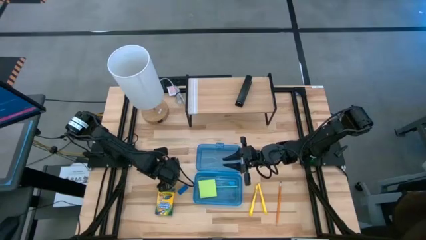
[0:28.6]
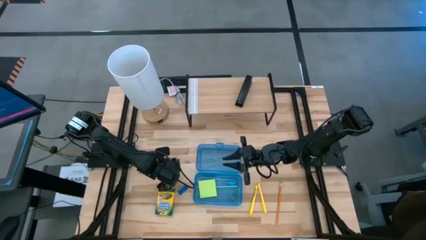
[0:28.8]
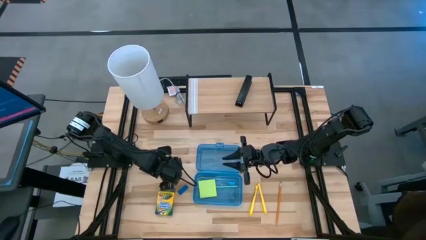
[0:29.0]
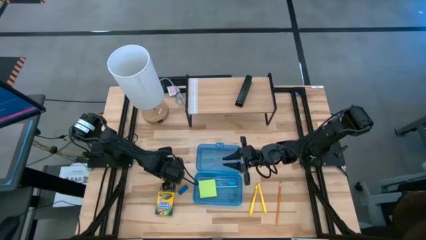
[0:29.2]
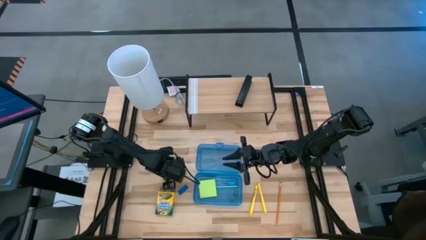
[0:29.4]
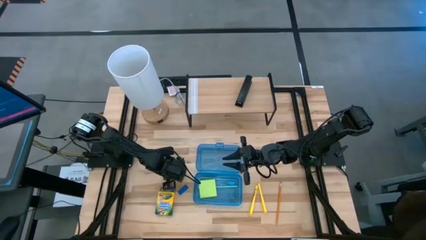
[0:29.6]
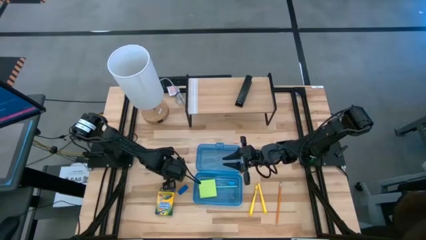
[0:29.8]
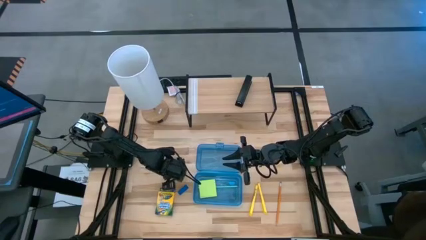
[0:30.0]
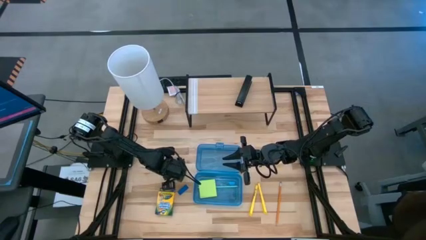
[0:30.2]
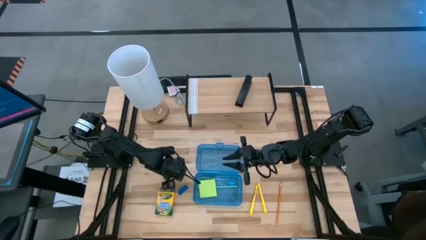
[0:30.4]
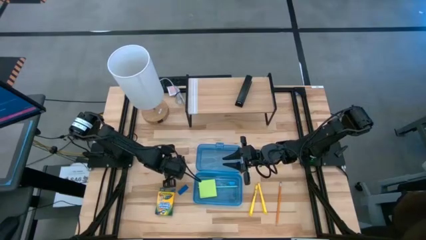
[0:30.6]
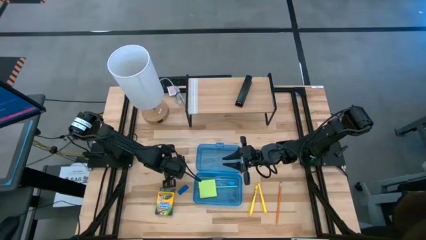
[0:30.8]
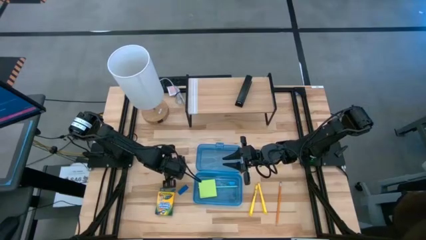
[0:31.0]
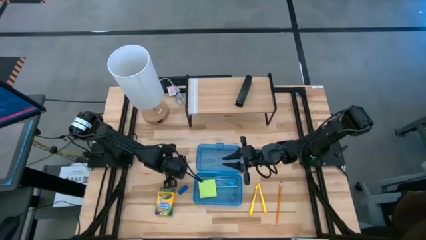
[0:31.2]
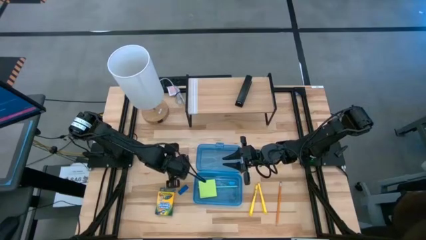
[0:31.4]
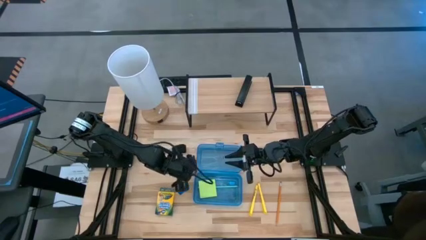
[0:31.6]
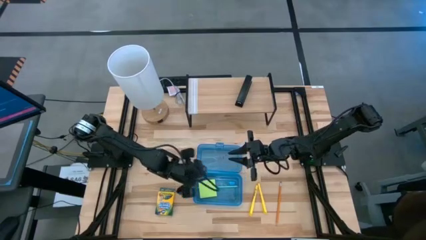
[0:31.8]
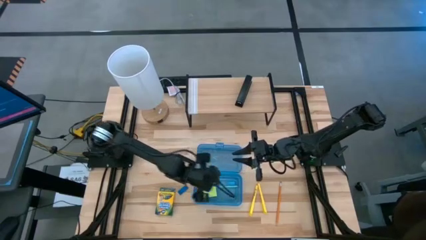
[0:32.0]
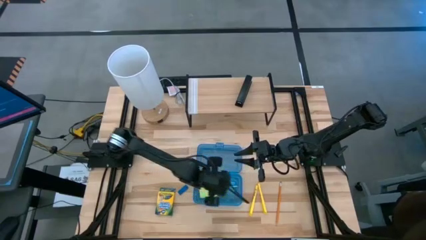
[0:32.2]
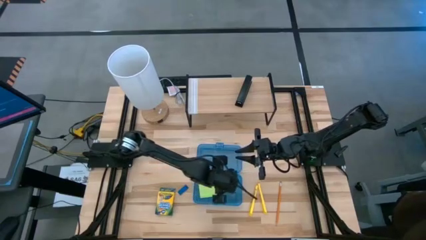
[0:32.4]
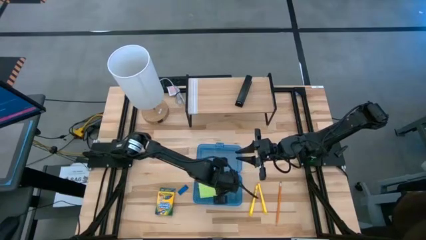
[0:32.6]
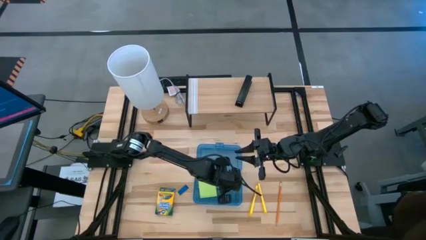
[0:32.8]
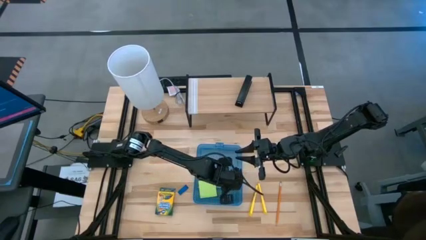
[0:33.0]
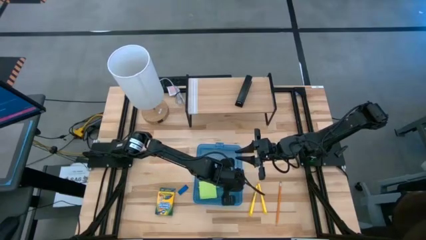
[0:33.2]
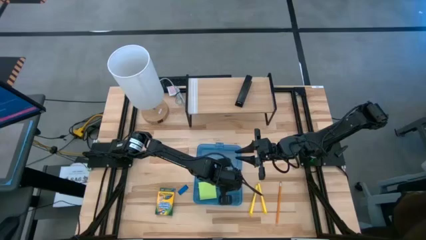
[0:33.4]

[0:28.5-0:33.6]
Task: Pack school essentials
Put the black scissors into the blue supply box

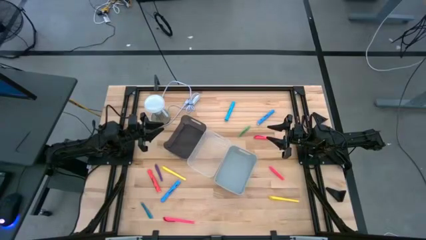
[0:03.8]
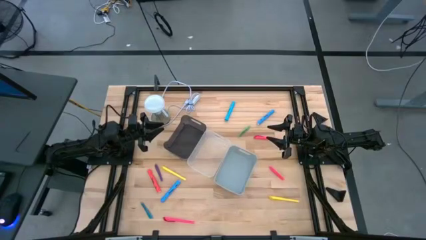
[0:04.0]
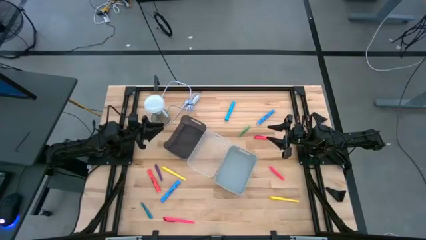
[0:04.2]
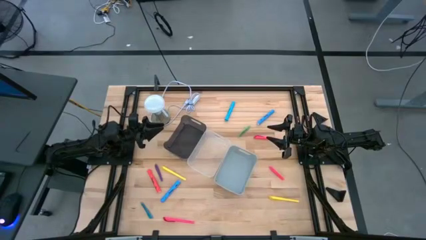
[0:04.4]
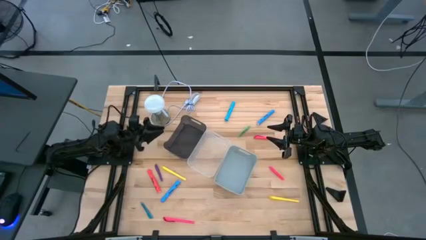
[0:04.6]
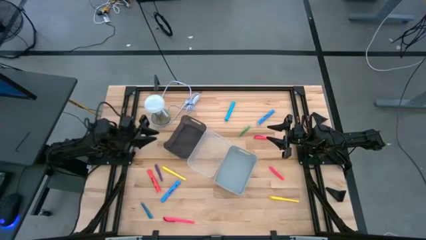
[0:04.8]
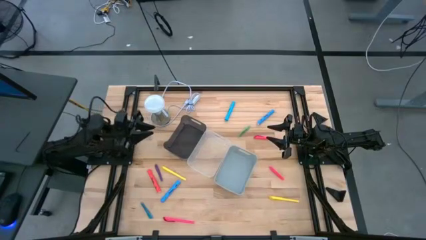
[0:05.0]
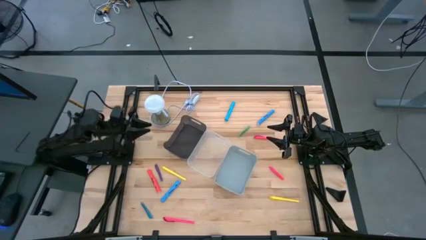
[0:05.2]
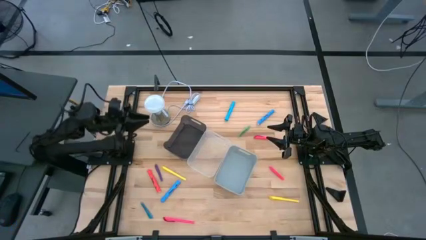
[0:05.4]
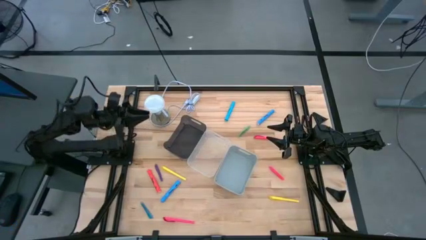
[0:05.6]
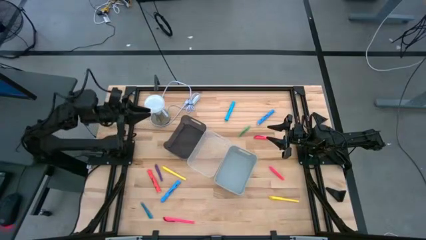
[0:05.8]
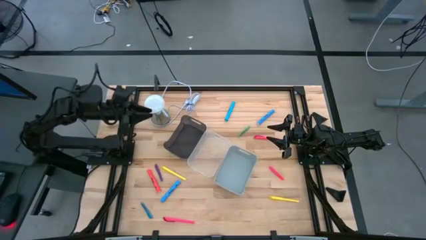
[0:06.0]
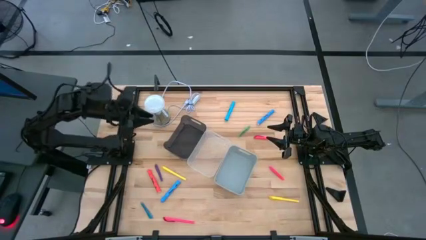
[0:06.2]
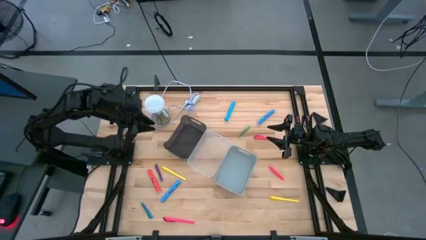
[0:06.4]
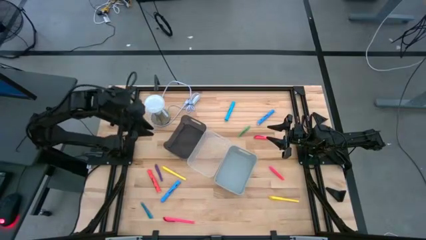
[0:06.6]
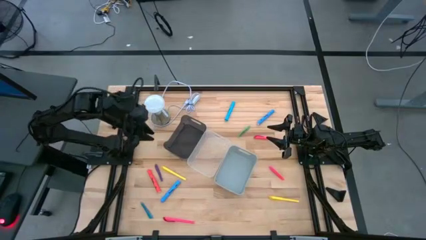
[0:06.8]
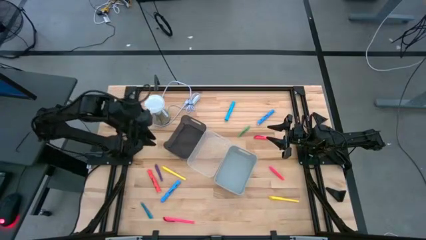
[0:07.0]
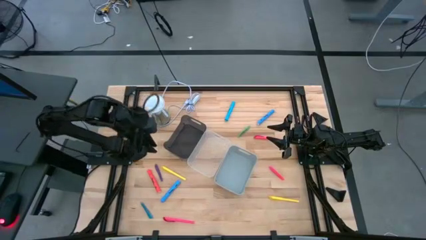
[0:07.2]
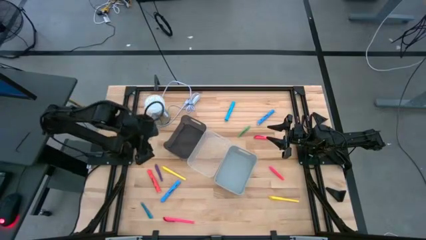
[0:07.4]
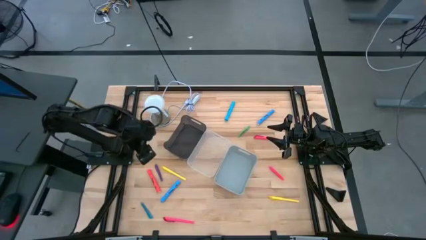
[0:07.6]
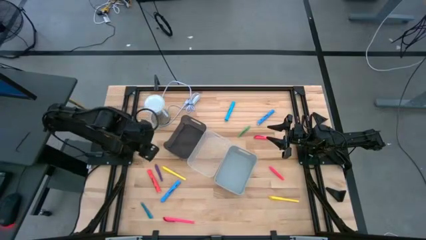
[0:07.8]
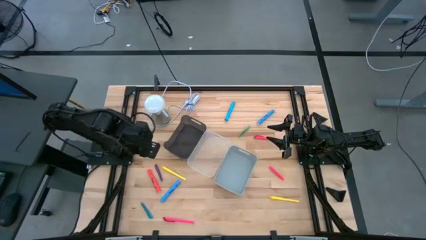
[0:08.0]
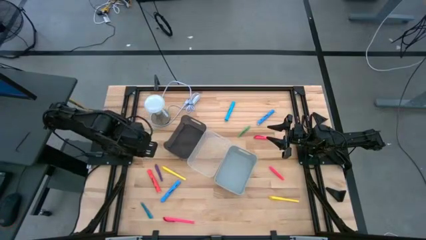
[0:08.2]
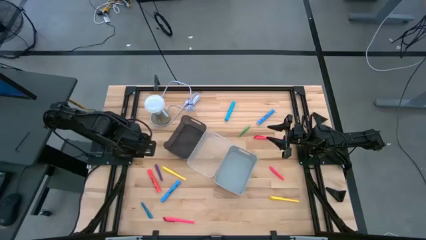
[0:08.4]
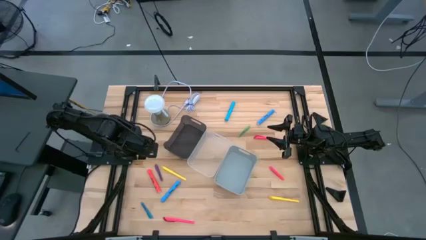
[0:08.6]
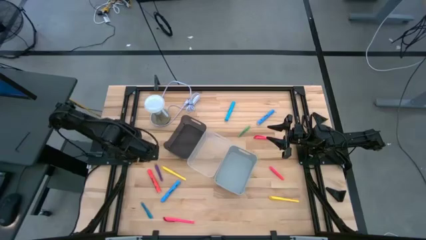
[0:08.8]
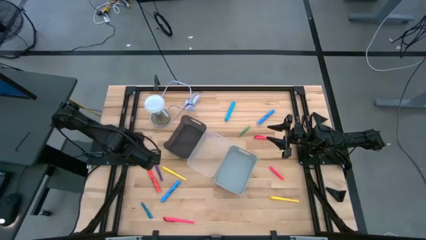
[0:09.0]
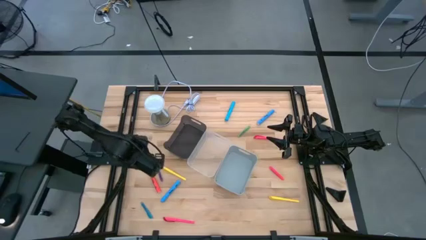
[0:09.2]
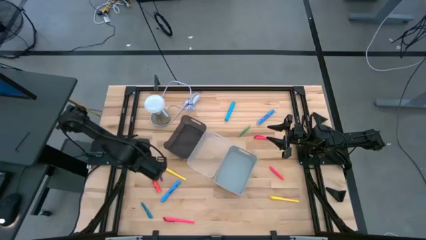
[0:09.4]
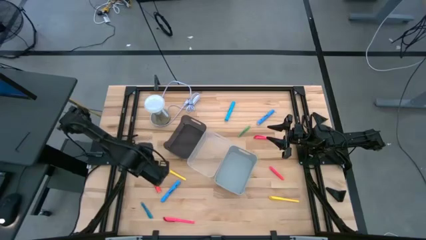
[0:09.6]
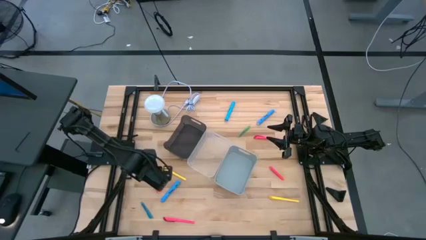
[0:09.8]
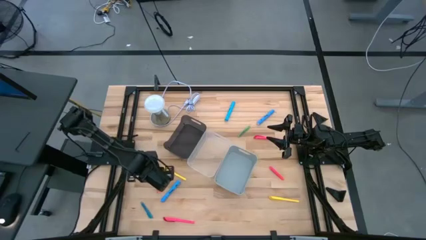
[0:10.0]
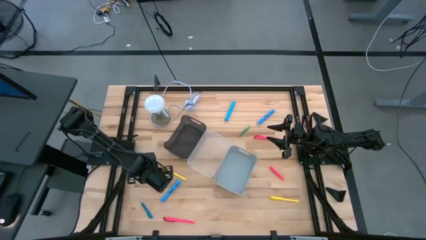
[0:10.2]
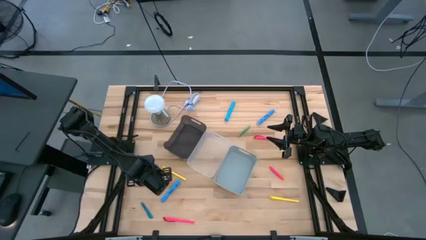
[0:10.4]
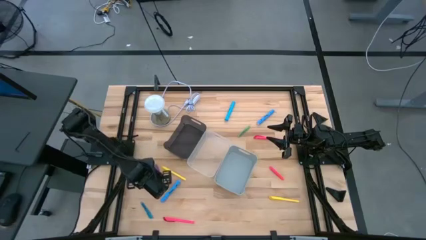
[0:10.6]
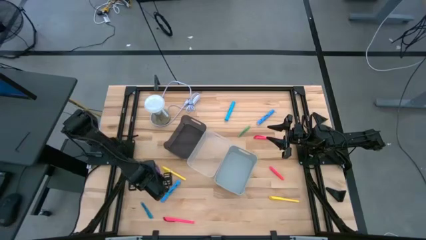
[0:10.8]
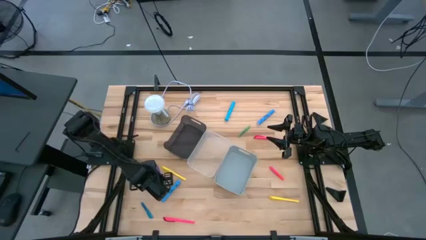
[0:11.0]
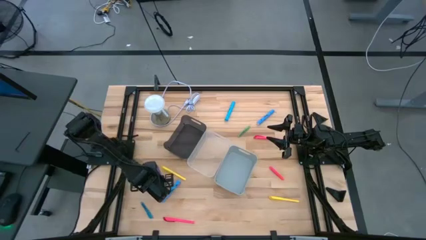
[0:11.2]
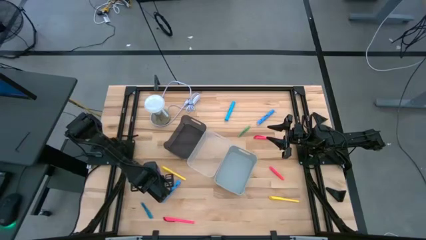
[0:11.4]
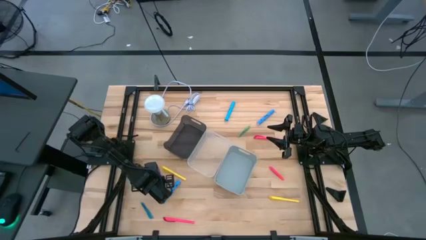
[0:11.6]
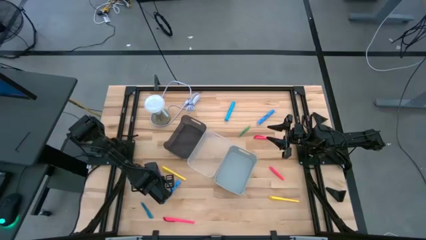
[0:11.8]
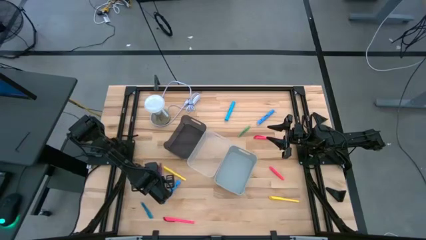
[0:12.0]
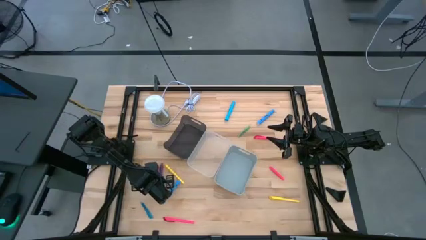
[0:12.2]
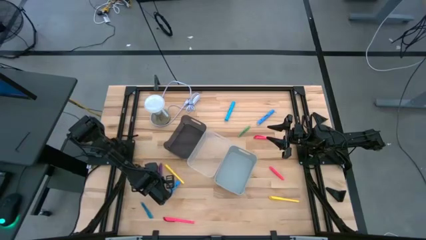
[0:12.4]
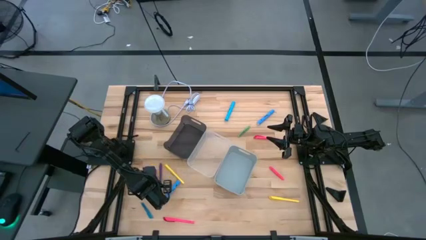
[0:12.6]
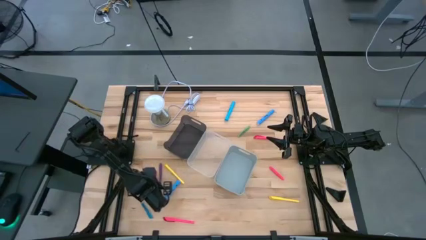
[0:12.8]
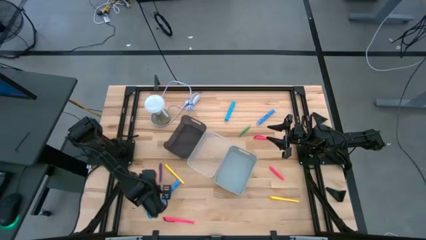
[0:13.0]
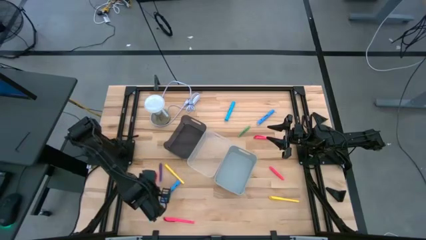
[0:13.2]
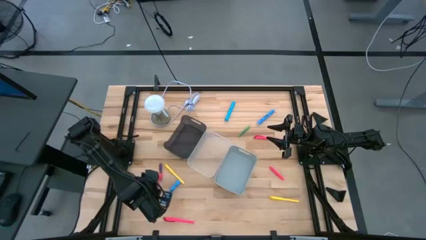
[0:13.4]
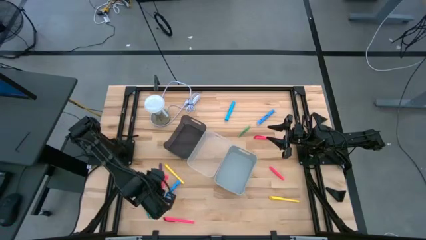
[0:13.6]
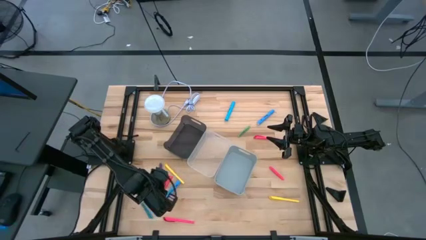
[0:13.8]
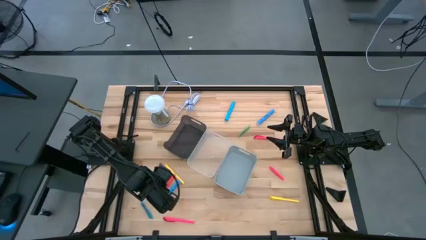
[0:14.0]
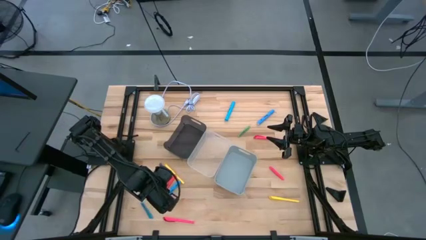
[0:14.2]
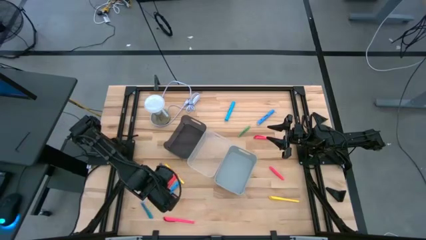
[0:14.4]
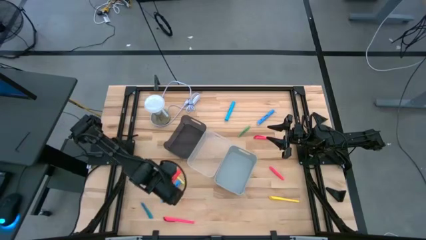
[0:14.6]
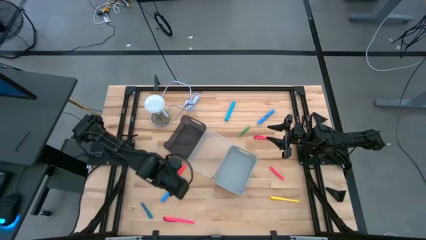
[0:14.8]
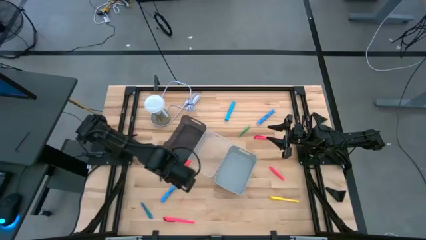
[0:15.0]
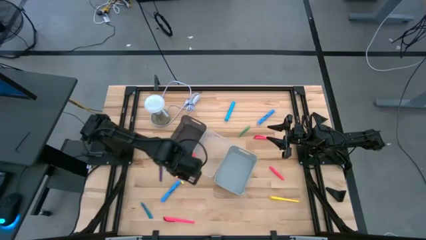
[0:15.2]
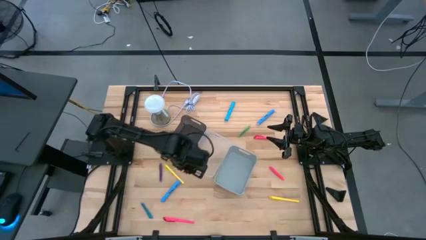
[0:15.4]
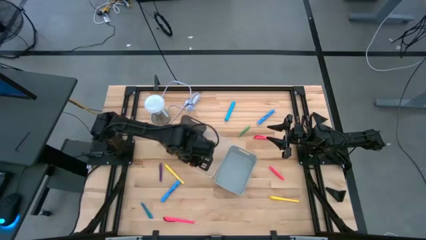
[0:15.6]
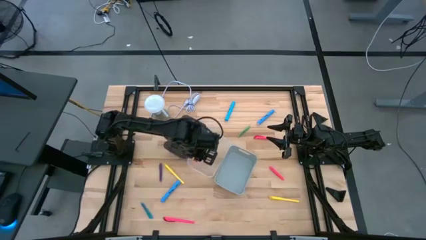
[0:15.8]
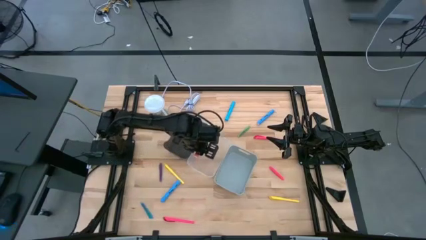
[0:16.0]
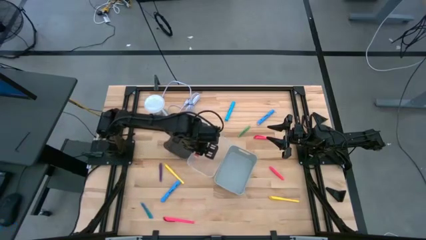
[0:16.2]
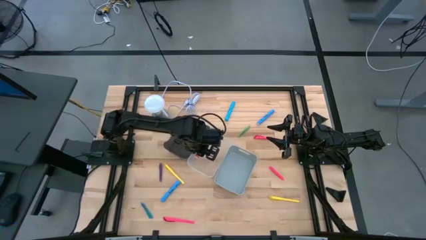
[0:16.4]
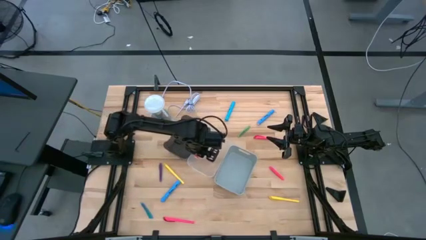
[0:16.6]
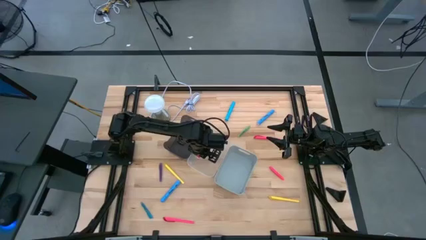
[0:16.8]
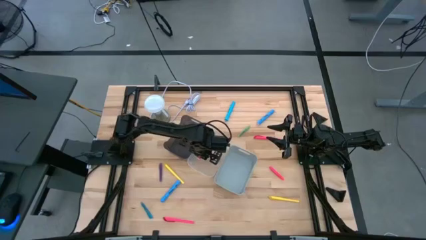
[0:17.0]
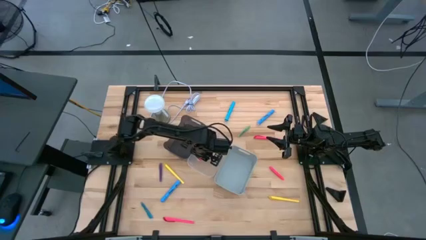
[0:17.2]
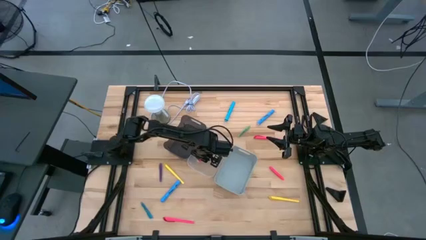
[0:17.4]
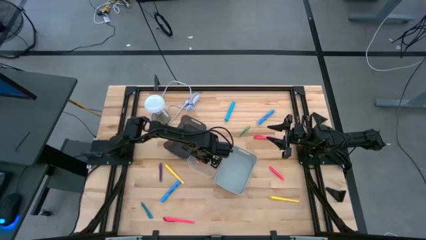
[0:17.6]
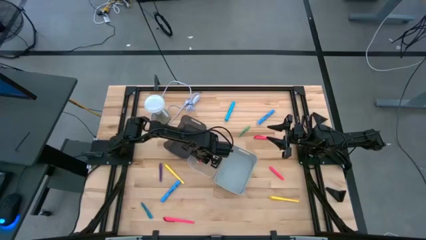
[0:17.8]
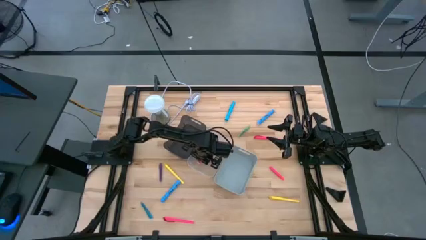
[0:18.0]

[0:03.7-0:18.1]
Task: Pick & Place Markers
Put the red highlighter into the transparent bin
